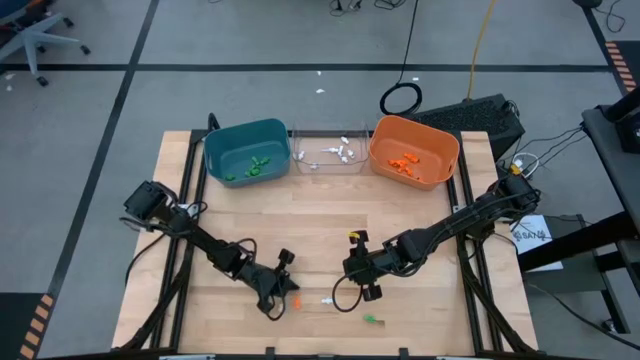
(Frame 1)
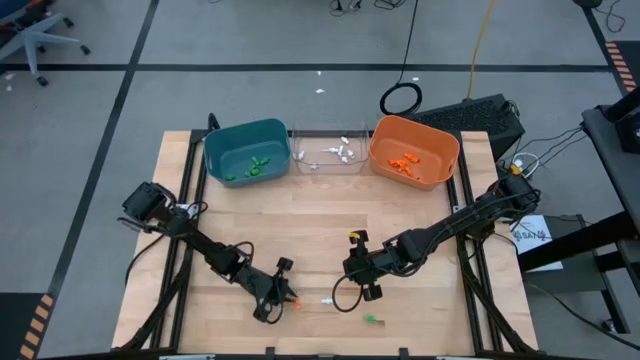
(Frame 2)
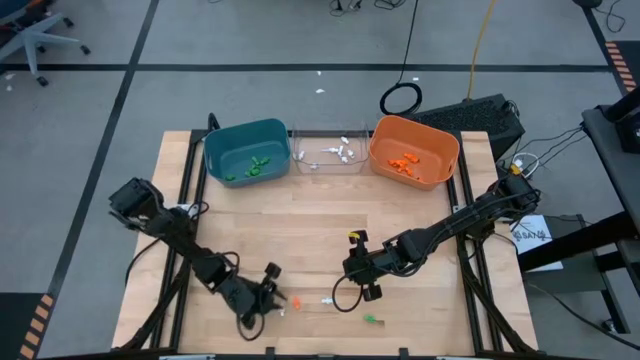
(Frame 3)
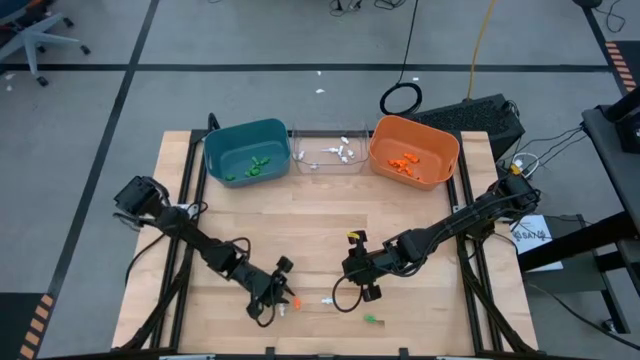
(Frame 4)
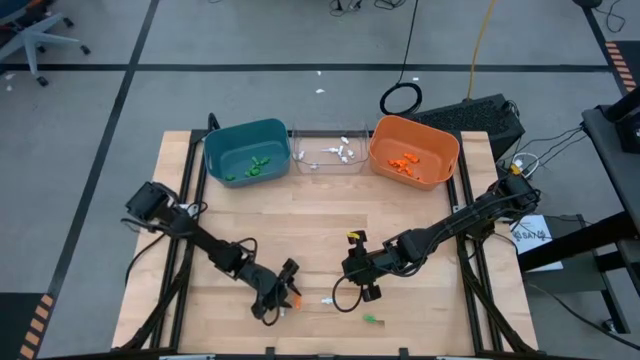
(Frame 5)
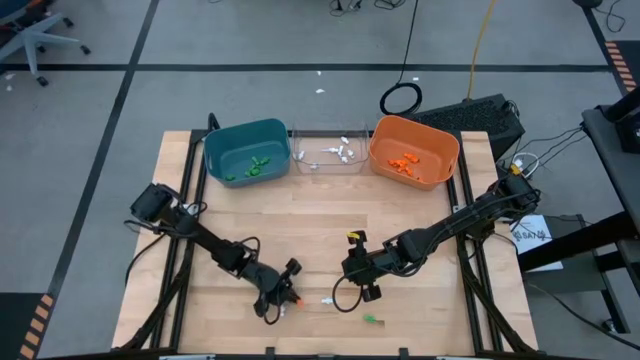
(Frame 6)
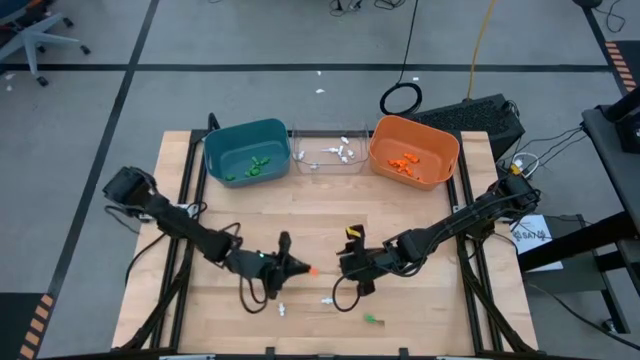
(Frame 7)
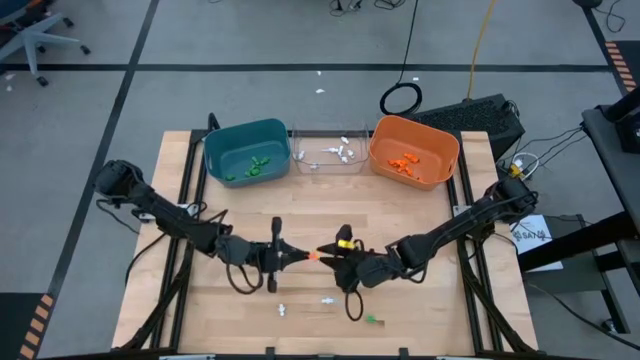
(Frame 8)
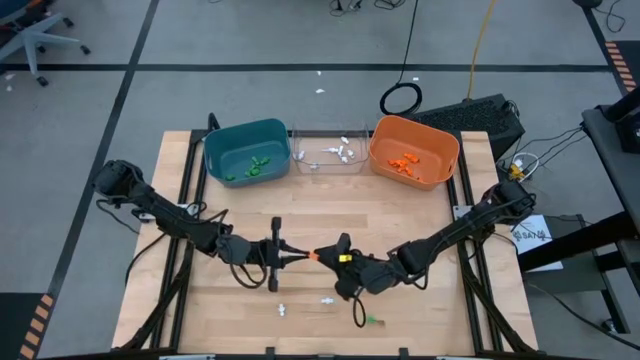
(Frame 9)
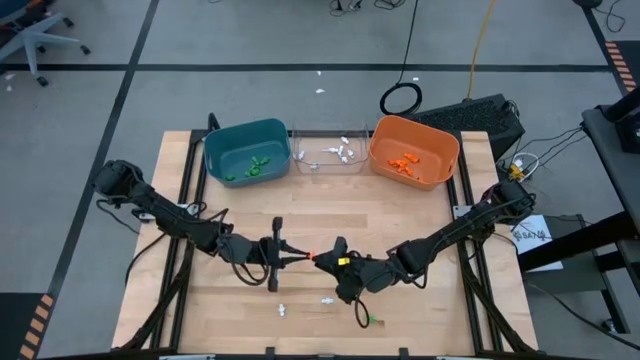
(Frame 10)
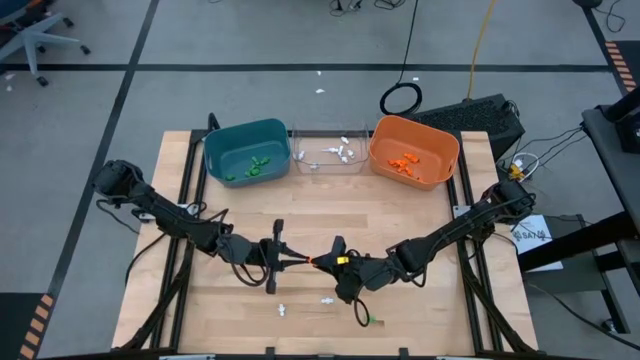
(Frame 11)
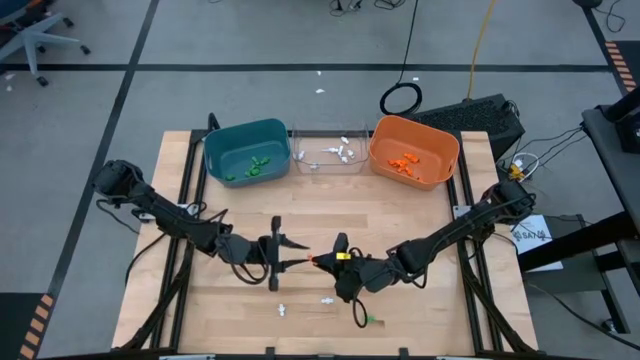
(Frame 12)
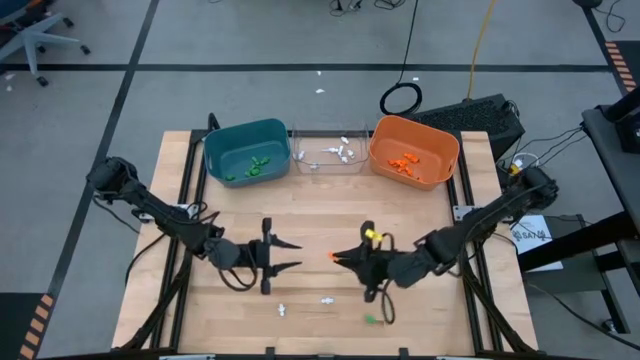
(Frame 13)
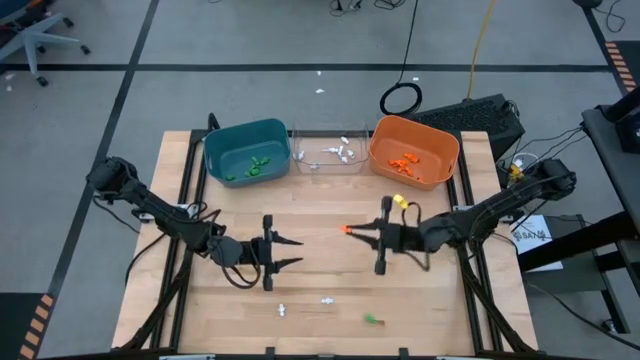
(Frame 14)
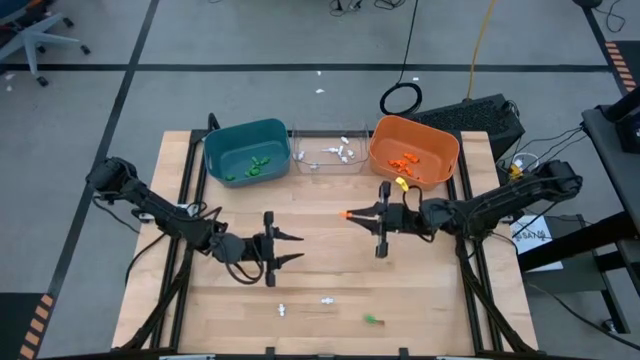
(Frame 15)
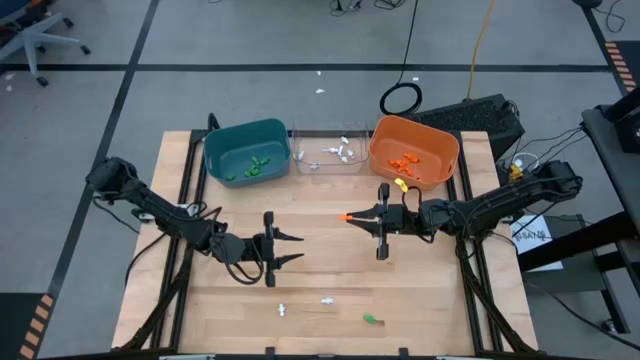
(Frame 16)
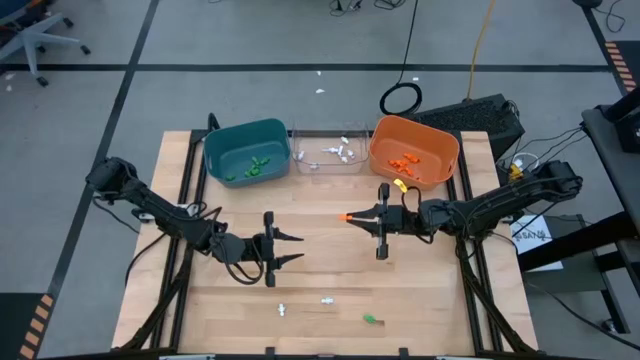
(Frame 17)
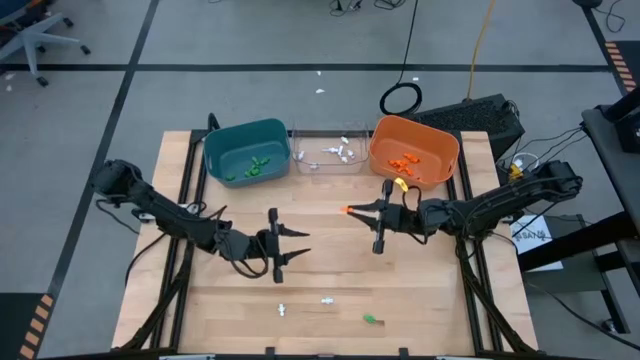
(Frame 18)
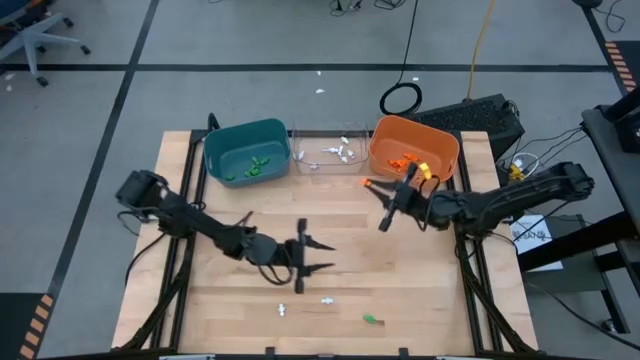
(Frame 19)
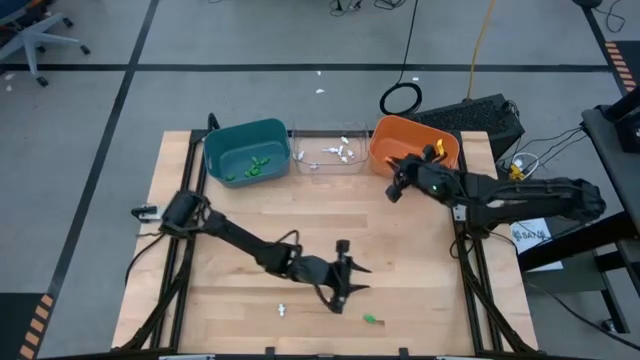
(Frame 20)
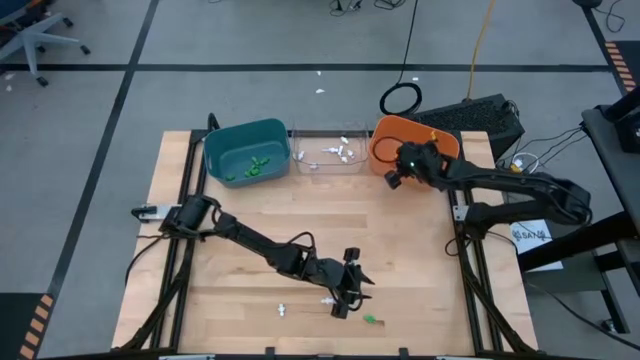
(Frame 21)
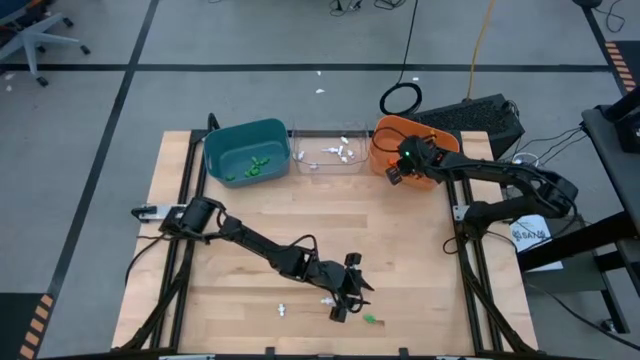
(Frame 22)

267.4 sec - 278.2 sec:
Task: Sort Halloween decoration
Put the orange skeleton toy into the orange bin

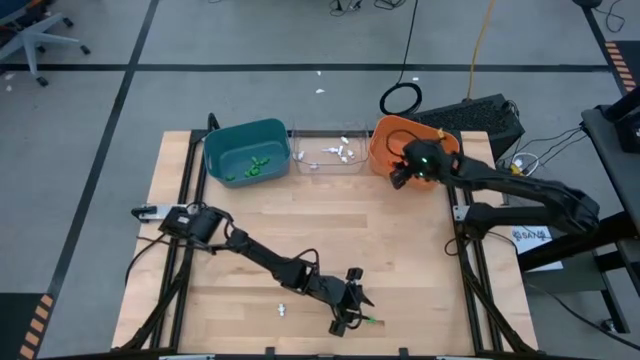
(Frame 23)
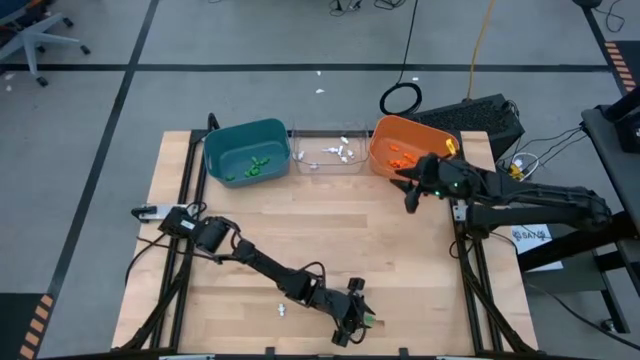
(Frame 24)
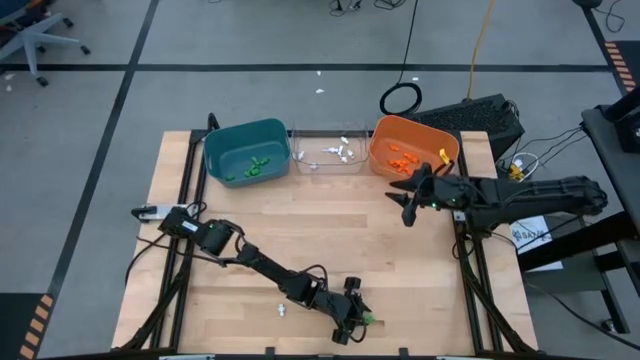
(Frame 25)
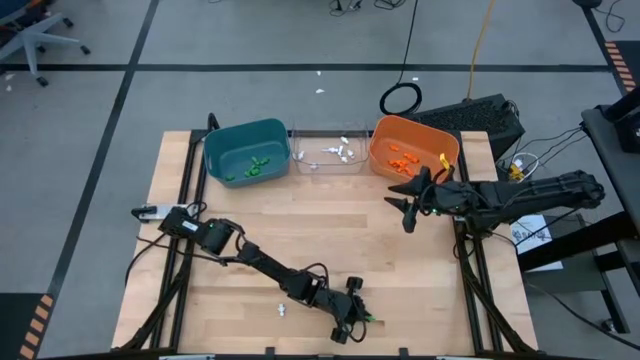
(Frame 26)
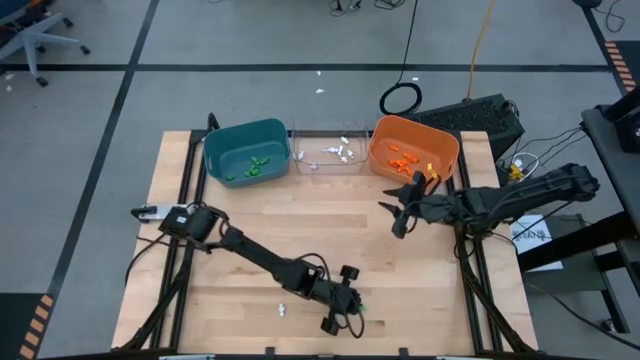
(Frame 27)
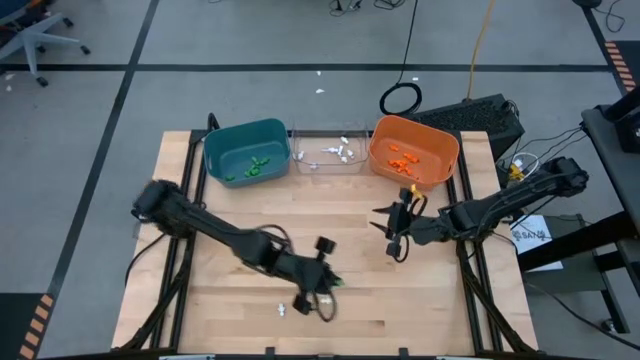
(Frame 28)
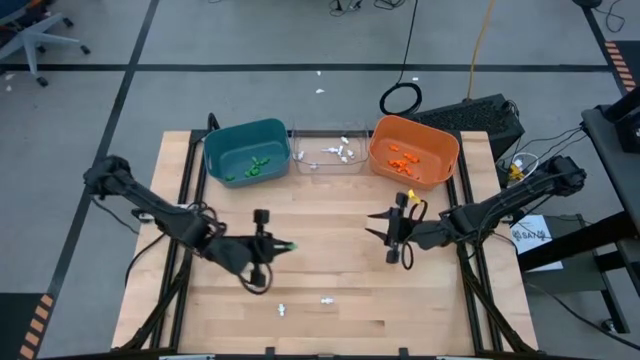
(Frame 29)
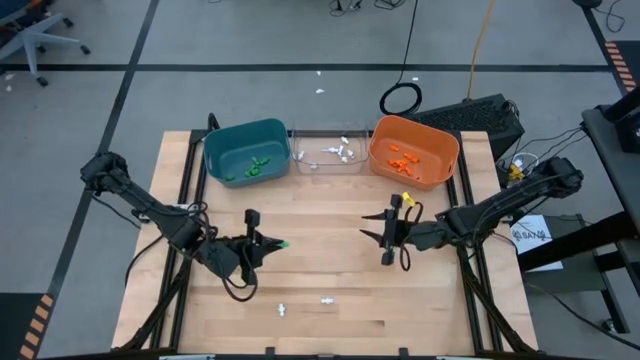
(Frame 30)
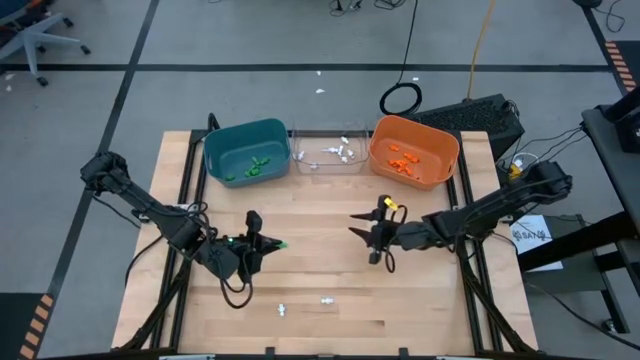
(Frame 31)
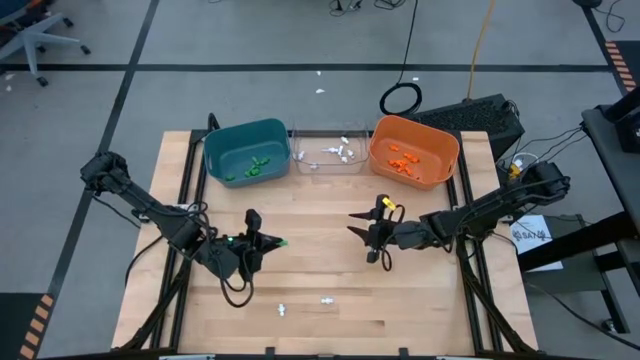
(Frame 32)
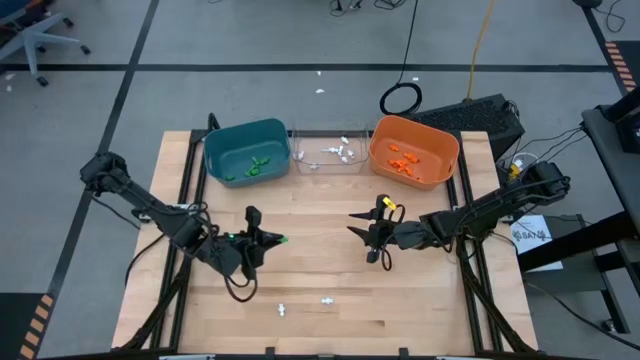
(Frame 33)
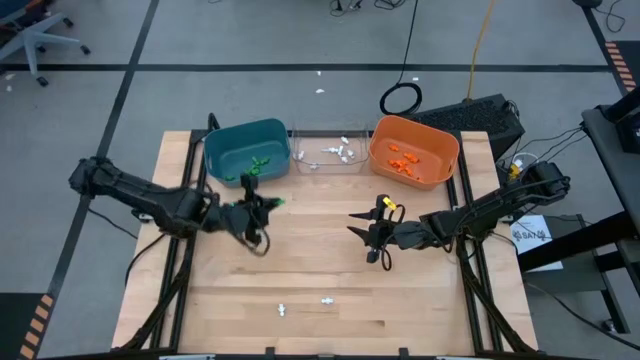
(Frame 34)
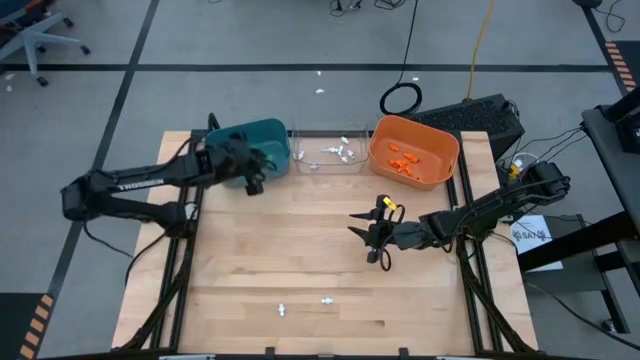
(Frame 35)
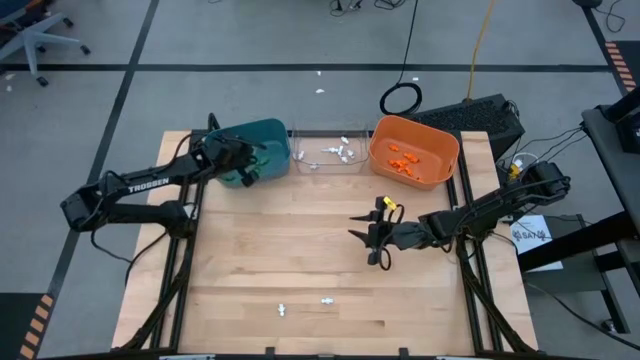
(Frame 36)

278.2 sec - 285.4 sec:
Put the green skeleton toy into the blue bin

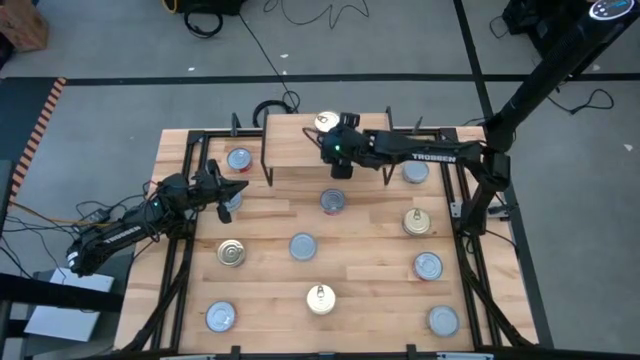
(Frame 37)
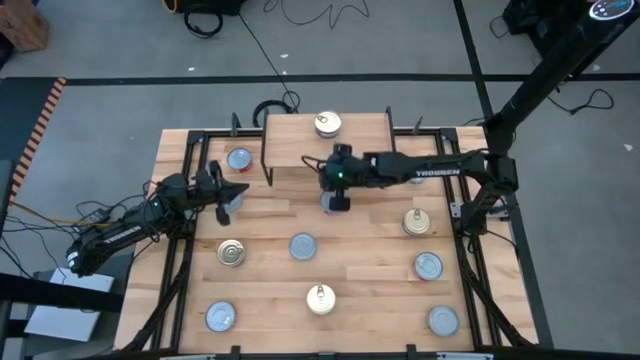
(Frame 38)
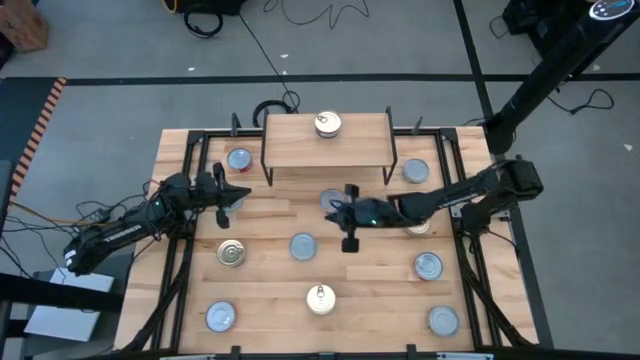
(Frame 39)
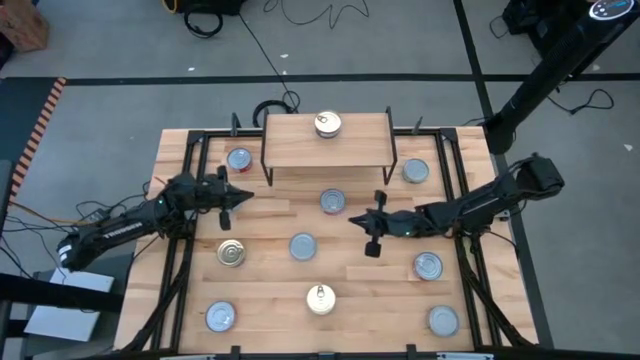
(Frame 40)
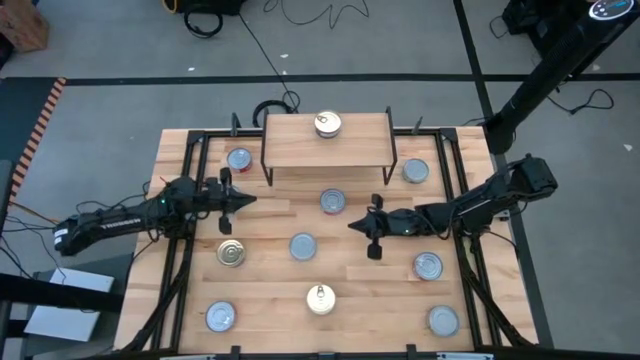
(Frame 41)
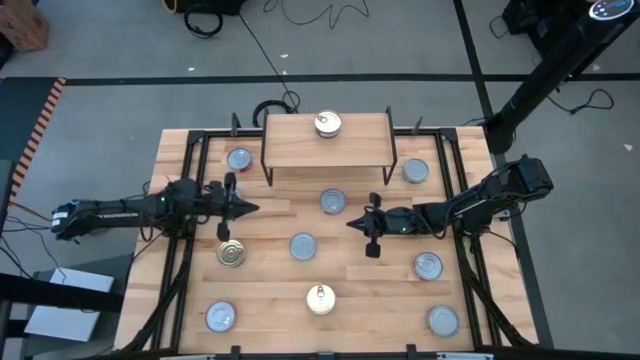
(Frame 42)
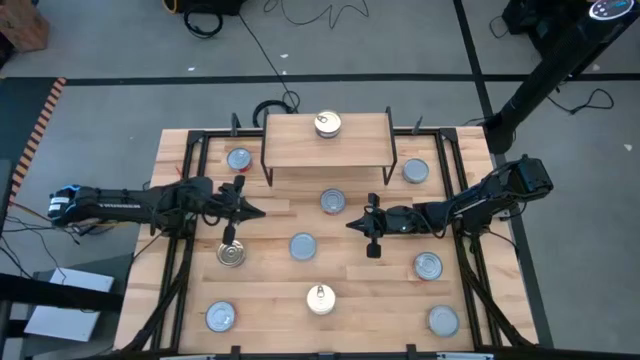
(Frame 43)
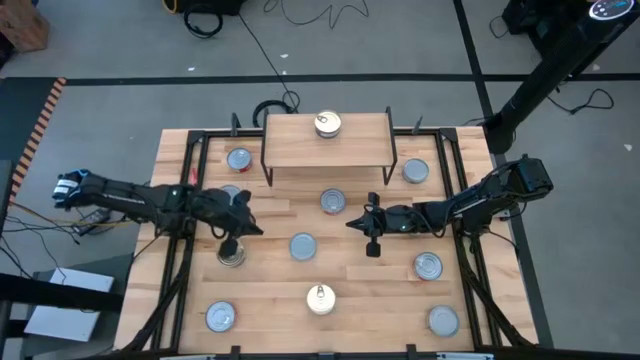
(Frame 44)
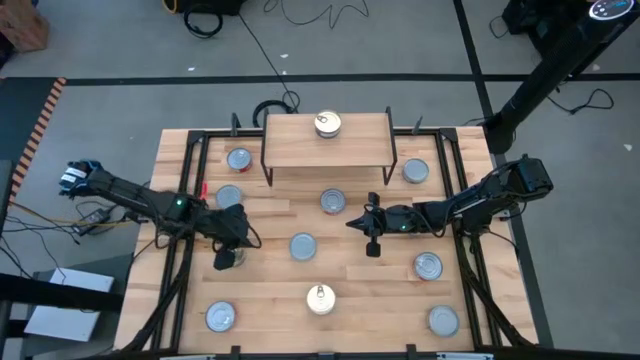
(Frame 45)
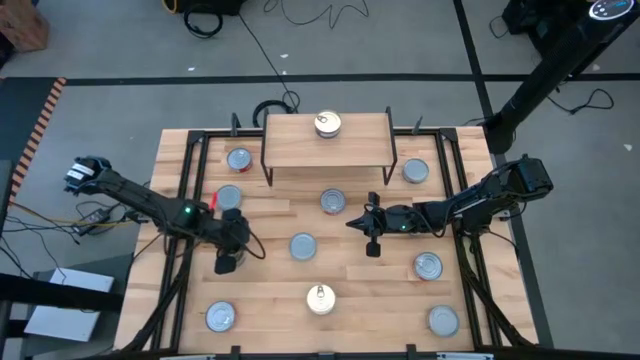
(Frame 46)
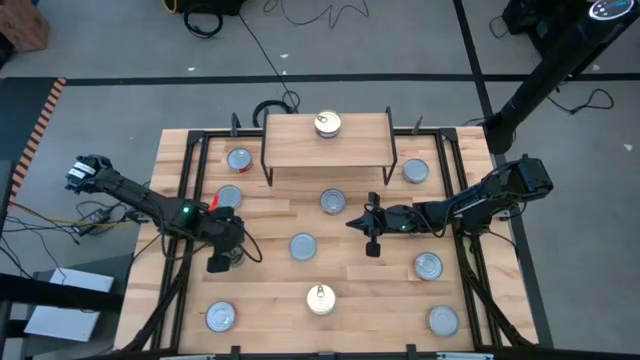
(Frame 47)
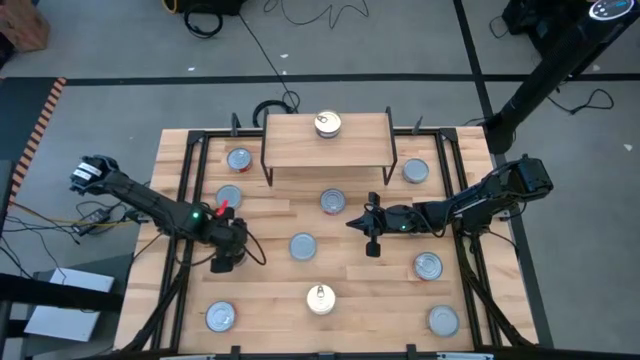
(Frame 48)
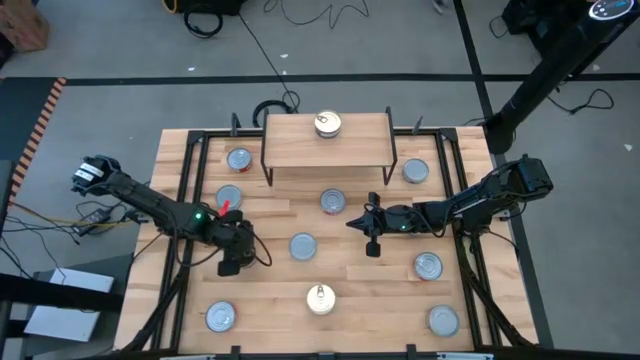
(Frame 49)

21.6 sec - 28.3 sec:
Task: Stack canned seafood by type on shelf
Adjust the blue pink tuna can on the table
